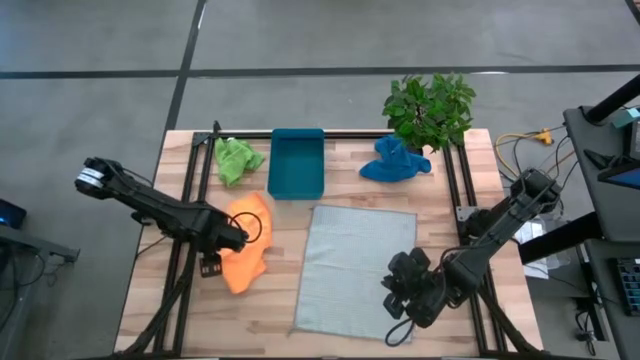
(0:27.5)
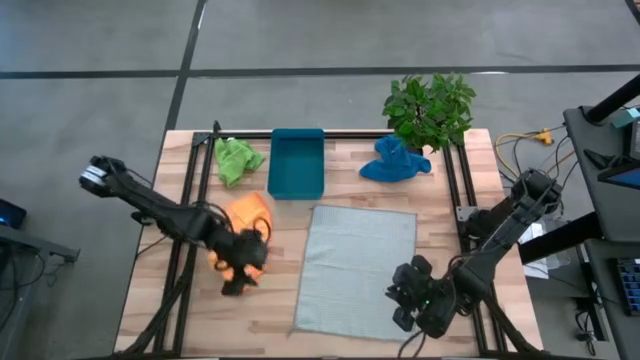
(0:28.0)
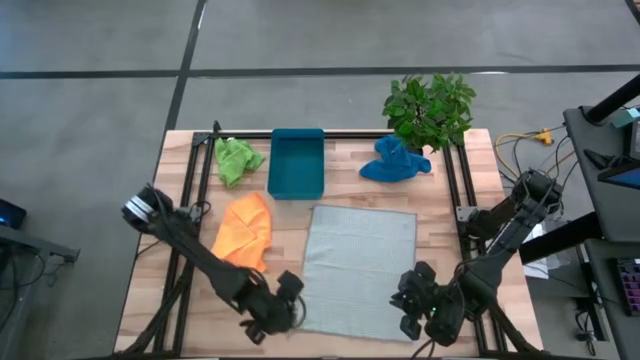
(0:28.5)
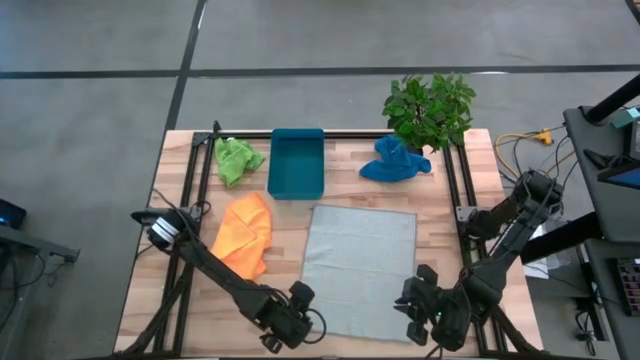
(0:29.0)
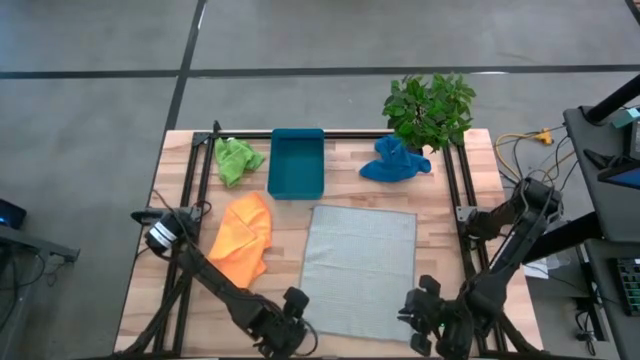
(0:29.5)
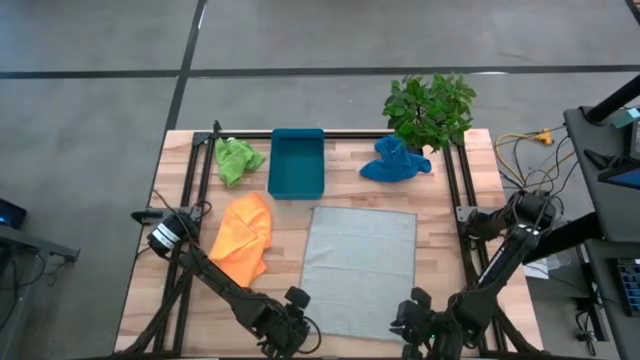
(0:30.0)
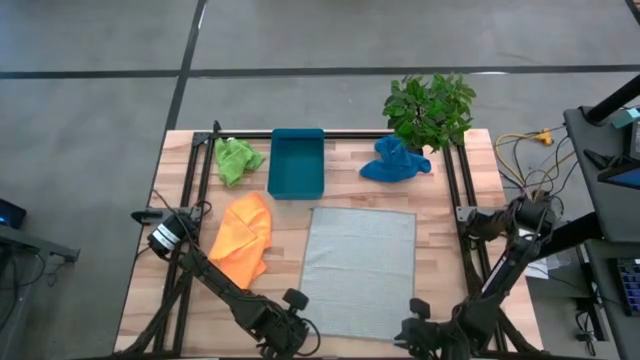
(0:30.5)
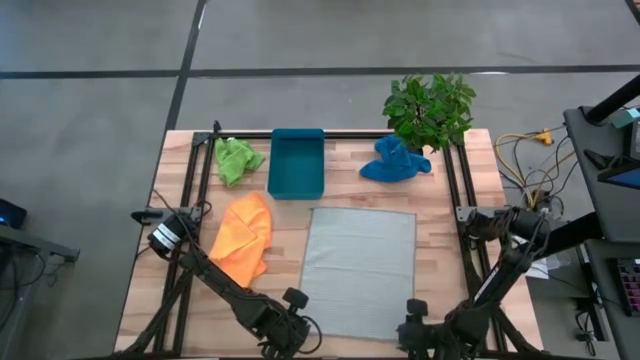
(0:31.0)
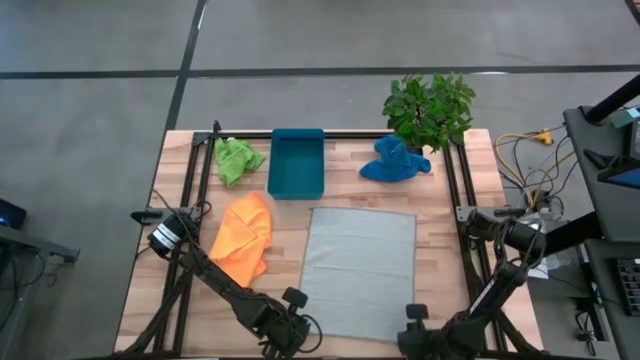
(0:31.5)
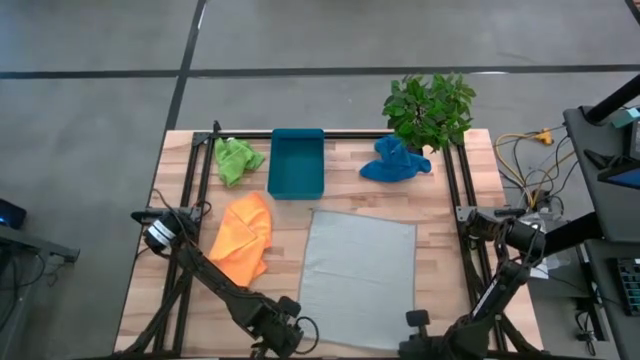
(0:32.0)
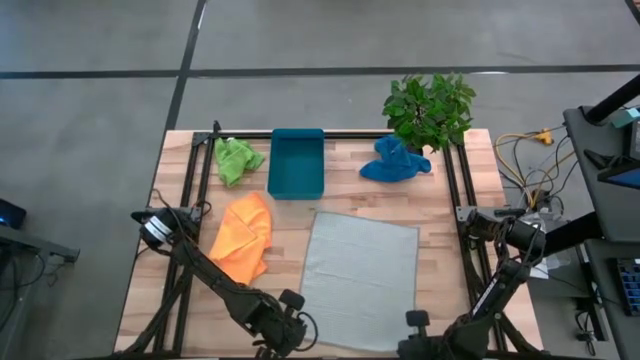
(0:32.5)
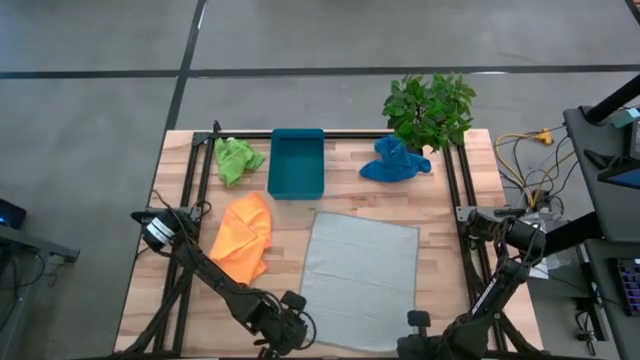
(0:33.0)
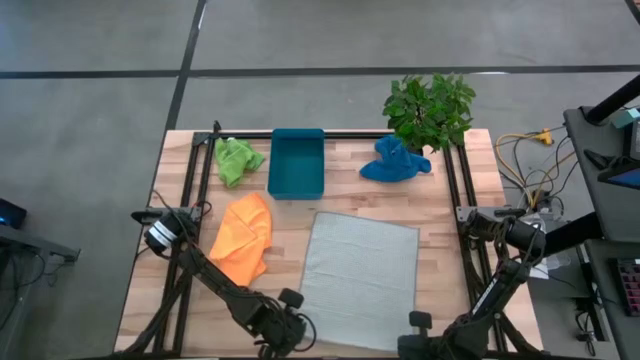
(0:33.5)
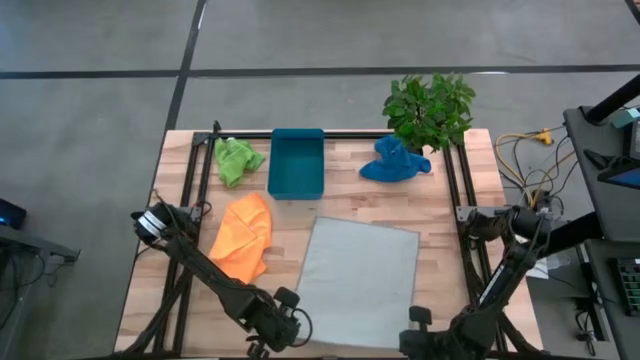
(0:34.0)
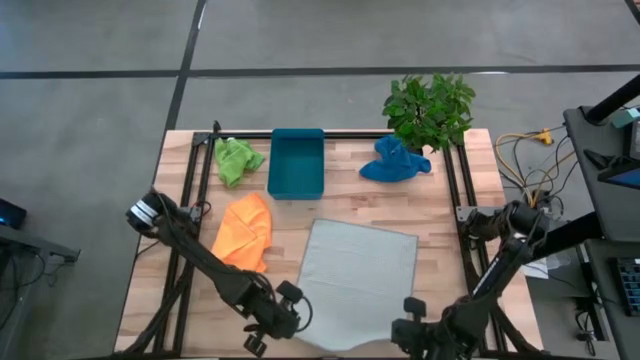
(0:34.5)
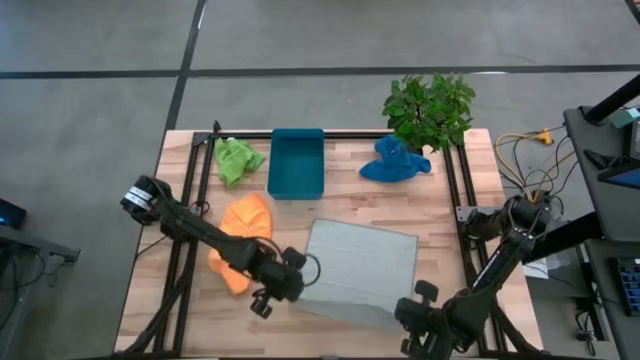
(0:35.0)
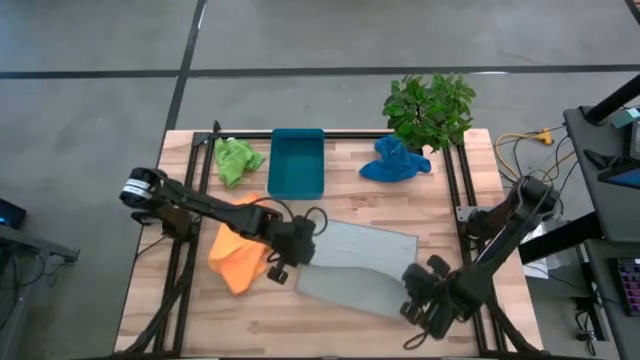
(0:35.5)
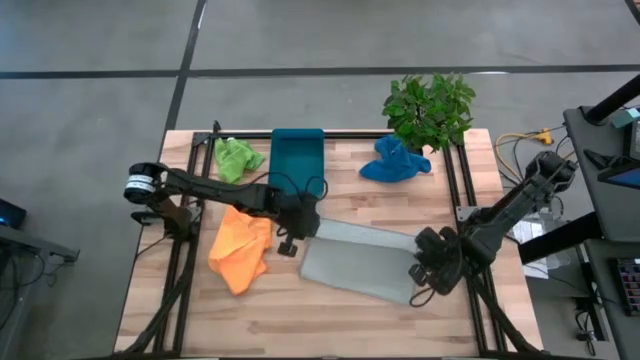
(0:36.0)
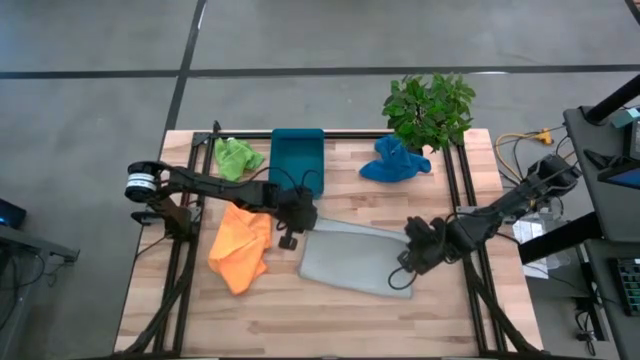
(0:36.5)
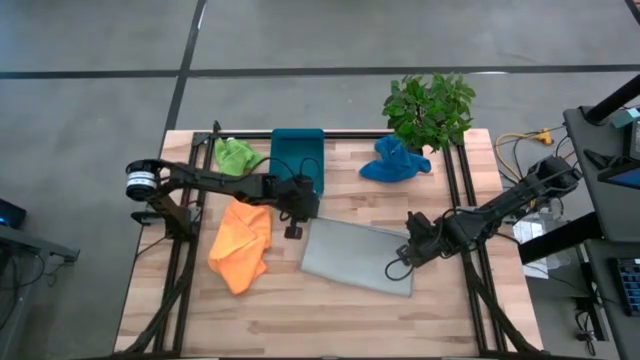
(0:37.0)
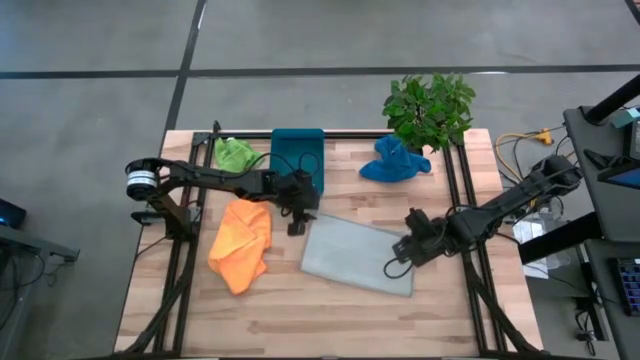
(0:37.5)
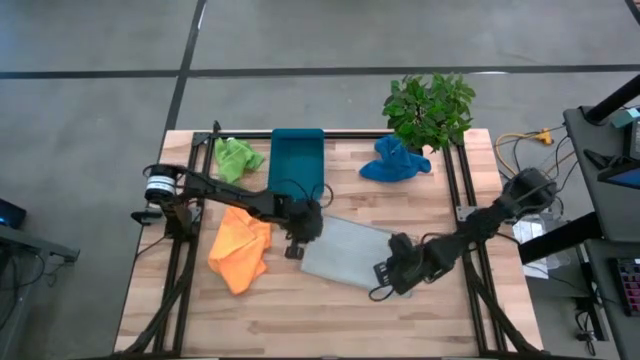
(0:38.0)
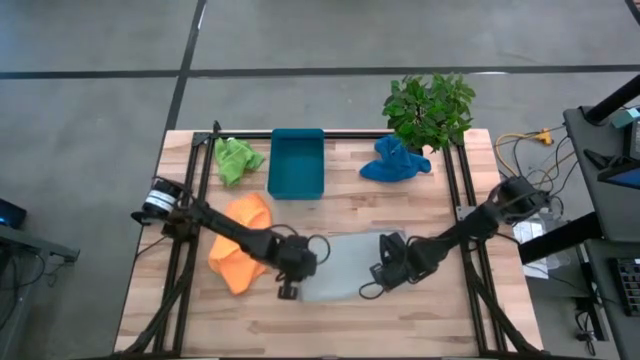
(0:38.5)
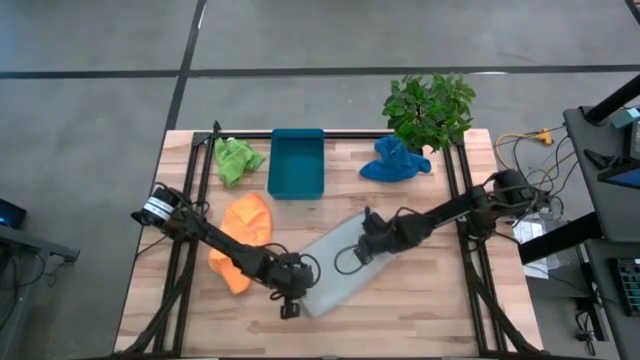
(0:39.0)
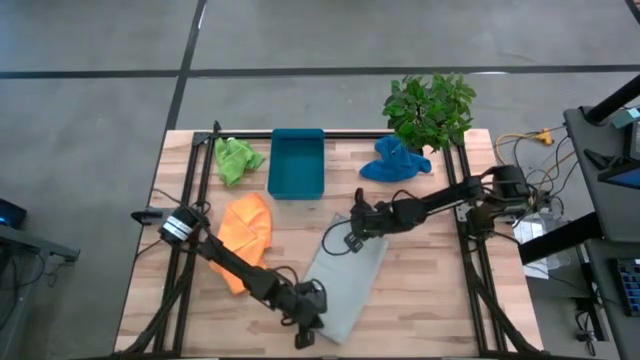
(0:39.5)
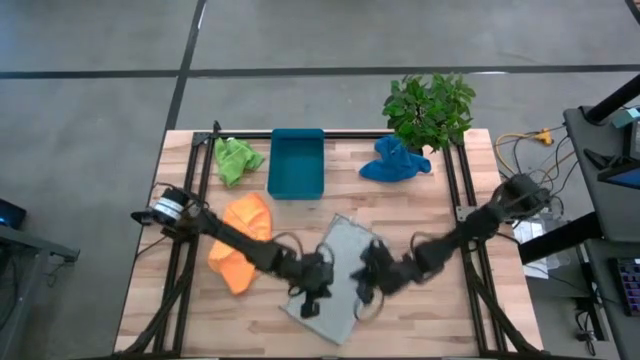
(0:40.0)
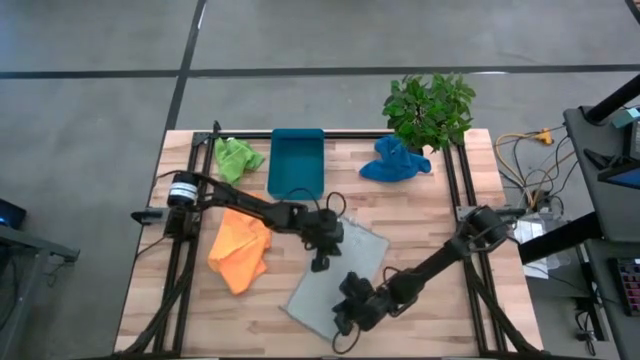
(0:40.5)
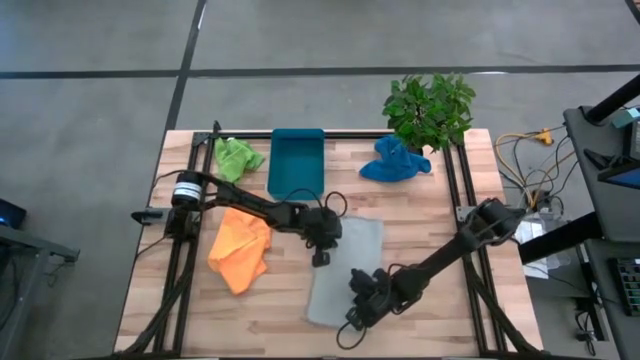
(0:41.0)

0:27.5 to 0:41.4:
Task: Fold microfiber towels
Fold the grey microfiber cloth

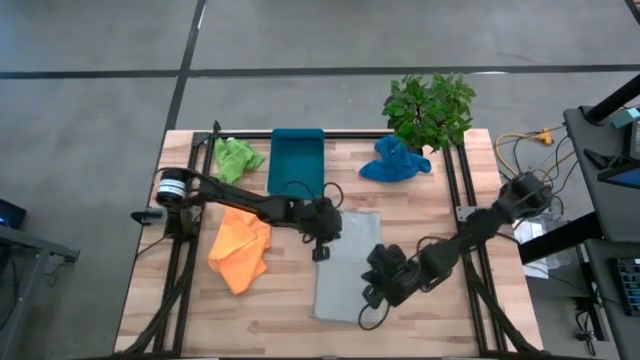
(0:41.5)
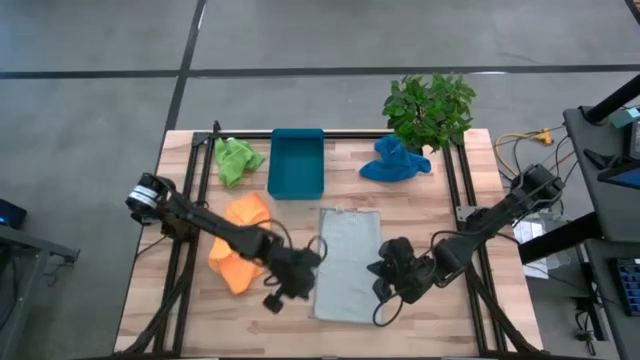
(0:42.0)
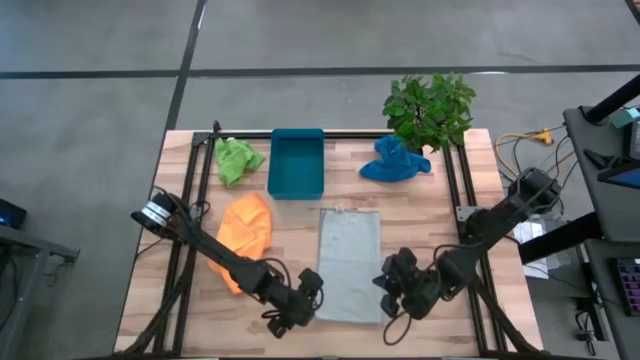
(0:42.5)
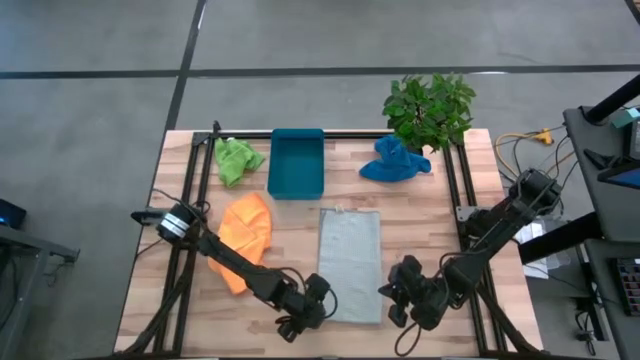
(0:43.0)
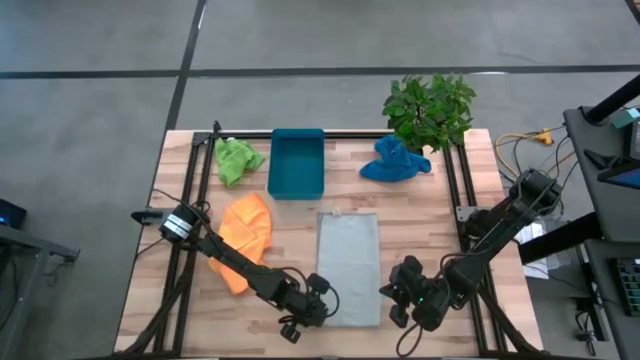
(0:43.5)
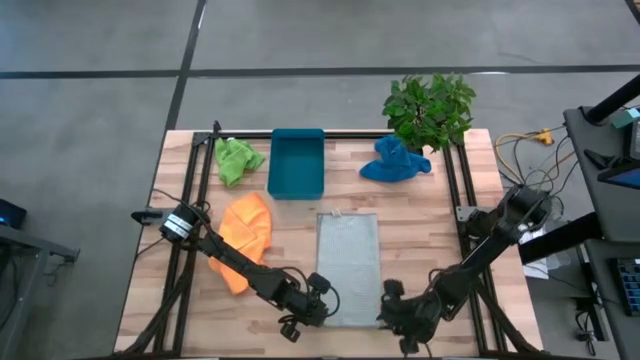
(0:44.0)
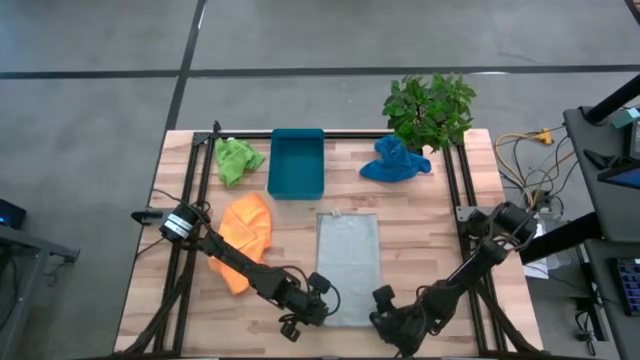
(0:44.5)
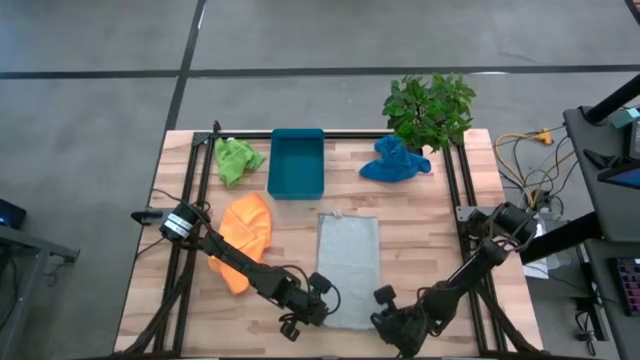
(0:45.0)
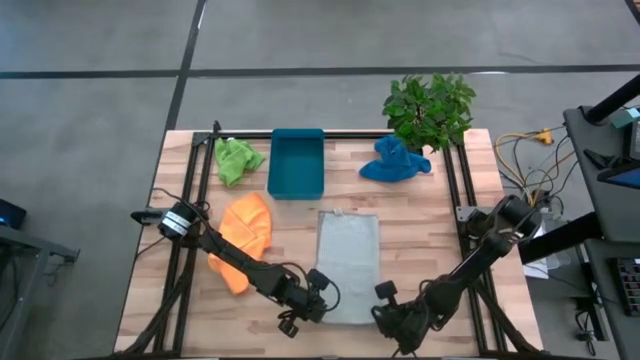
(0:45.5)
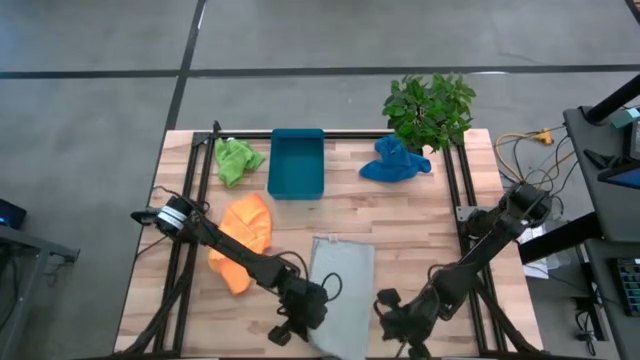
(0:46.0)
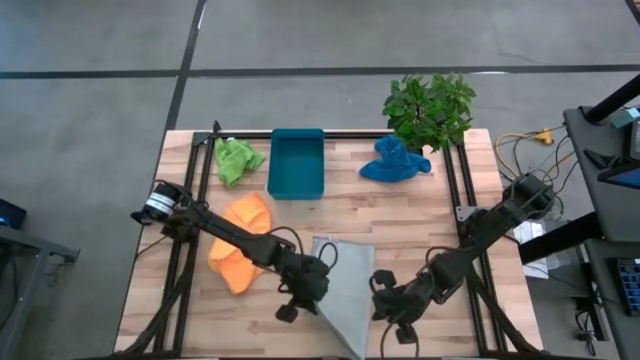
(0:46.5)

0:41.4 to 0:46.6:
Fold the grey microfiber cloth

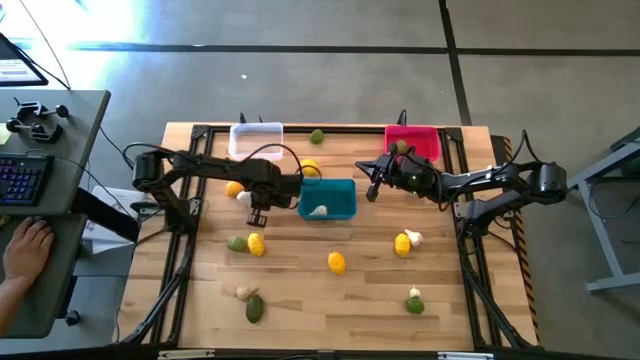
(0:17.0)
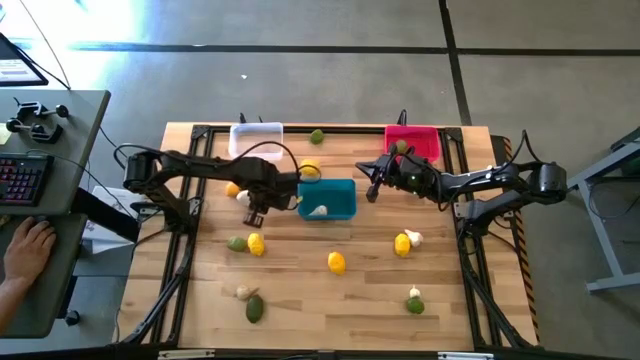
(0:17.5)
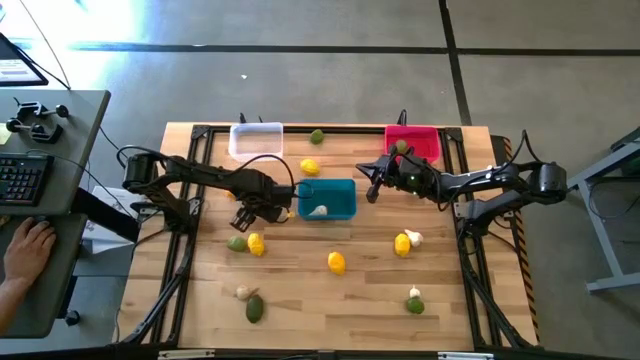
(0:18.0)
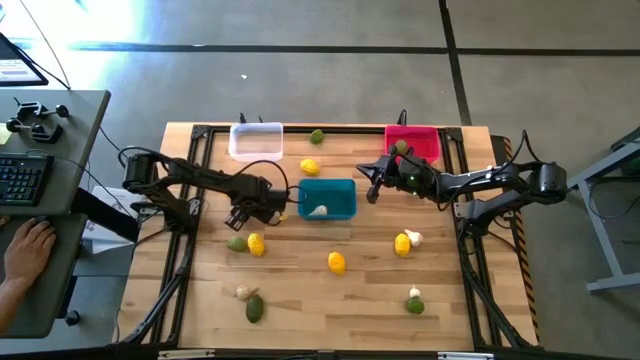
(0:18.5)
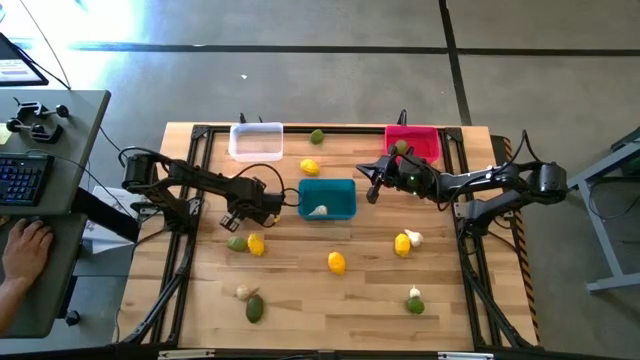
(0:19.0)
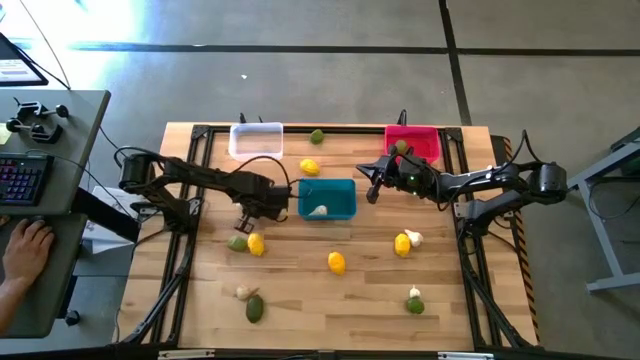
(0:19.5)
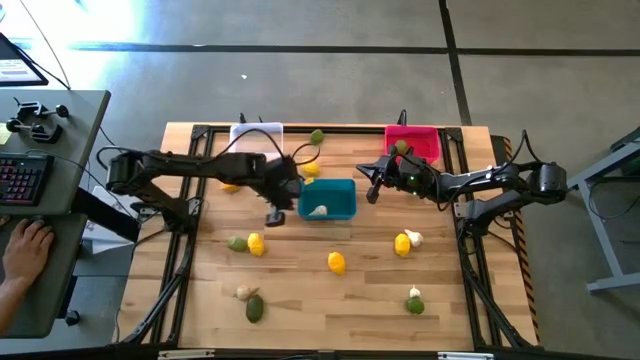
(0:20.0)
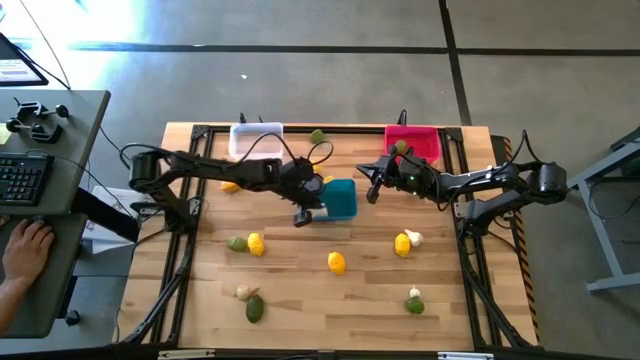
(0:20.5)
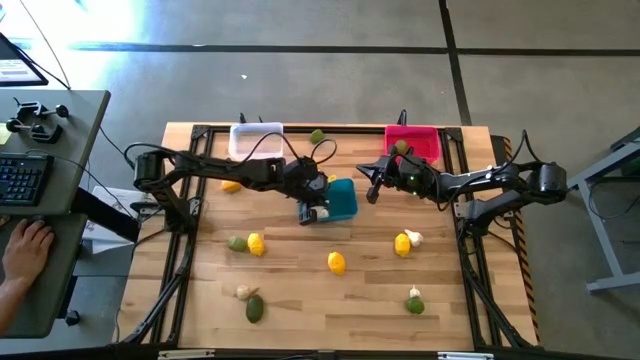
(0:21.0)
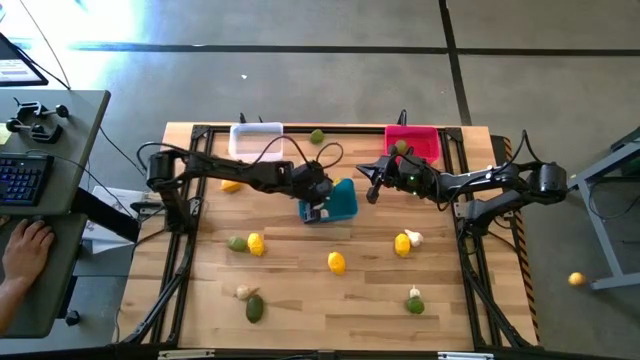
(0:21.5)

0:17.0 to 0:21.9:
Task: Sort produce into baskets
Put the garlic into the blue bin
